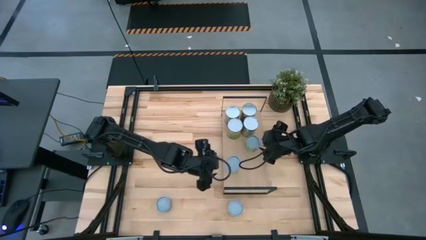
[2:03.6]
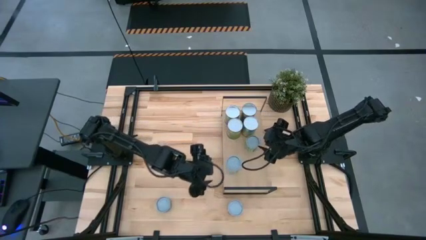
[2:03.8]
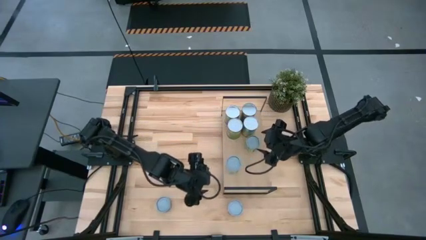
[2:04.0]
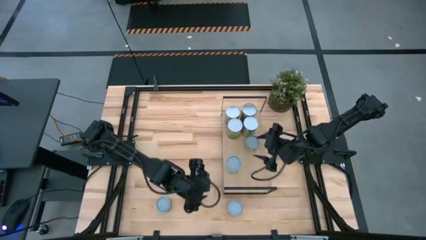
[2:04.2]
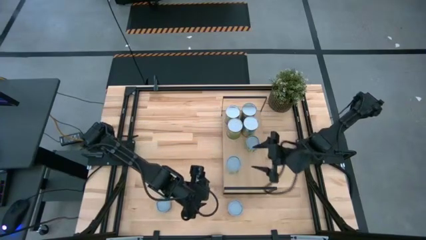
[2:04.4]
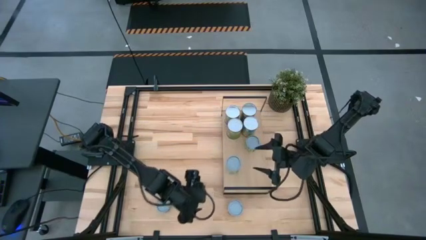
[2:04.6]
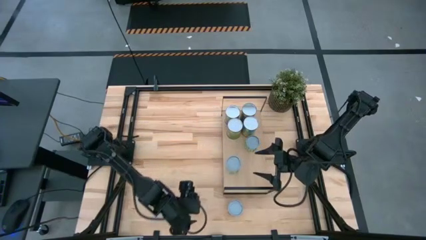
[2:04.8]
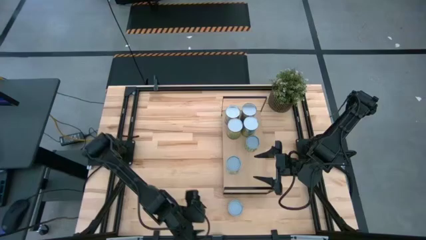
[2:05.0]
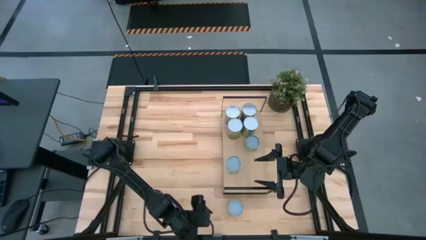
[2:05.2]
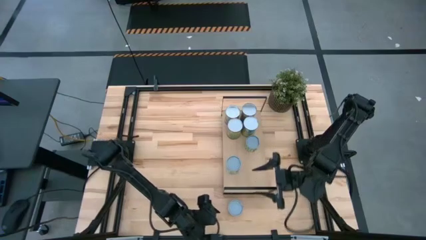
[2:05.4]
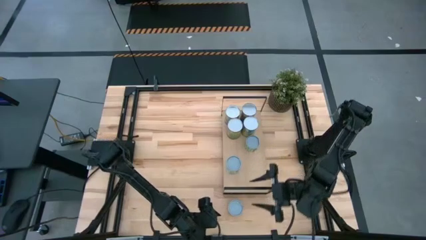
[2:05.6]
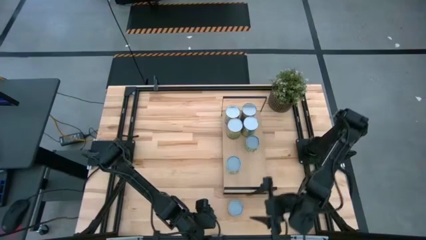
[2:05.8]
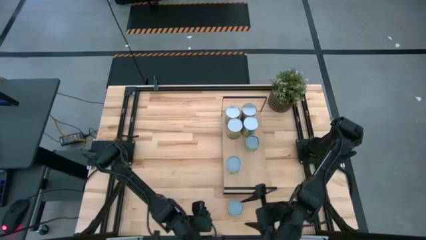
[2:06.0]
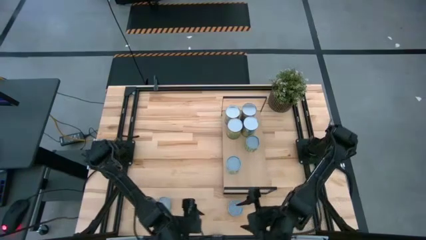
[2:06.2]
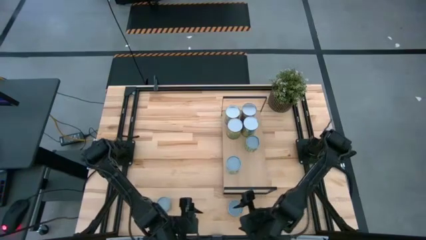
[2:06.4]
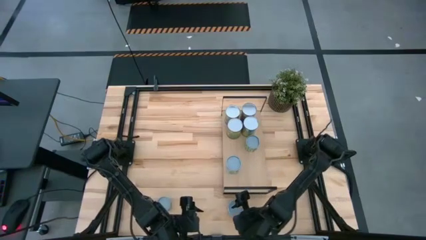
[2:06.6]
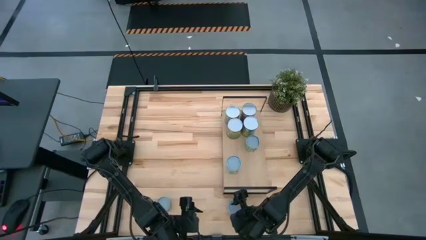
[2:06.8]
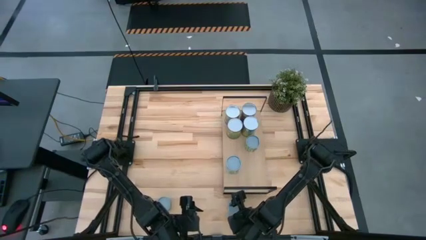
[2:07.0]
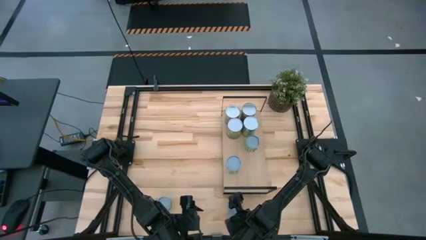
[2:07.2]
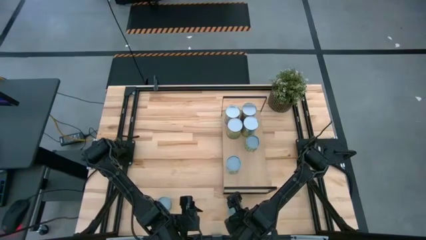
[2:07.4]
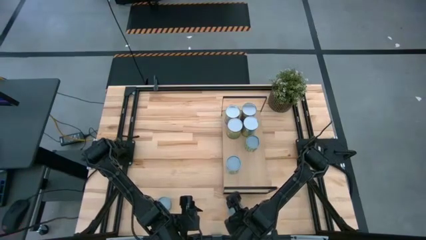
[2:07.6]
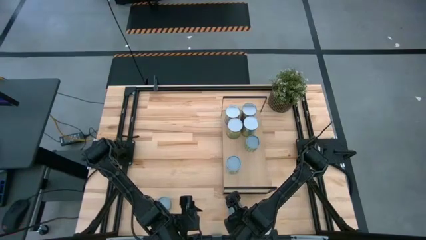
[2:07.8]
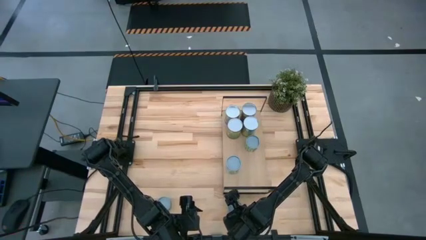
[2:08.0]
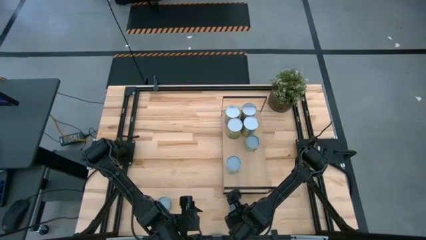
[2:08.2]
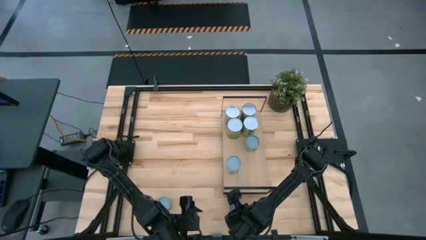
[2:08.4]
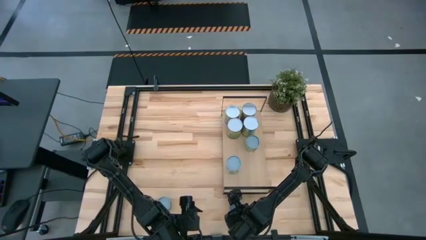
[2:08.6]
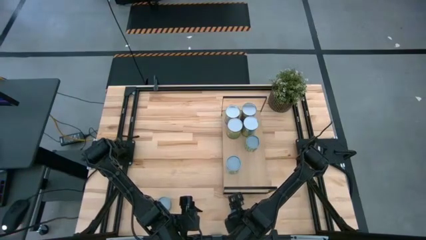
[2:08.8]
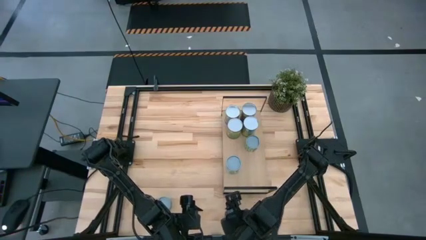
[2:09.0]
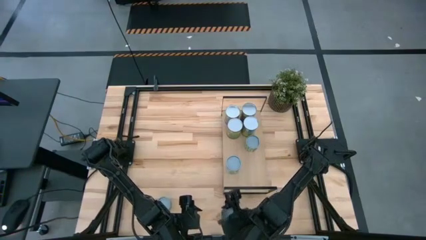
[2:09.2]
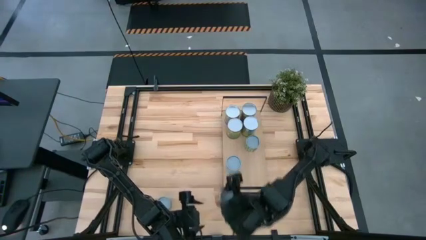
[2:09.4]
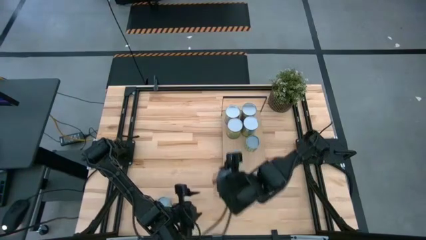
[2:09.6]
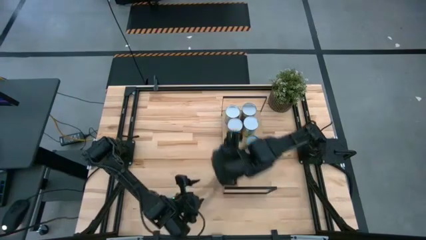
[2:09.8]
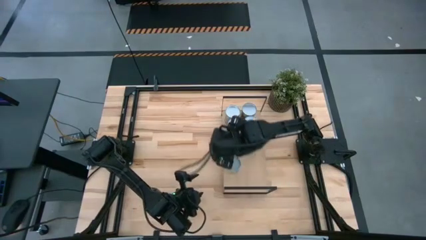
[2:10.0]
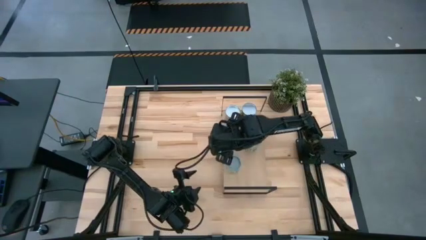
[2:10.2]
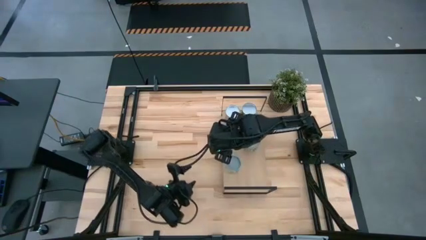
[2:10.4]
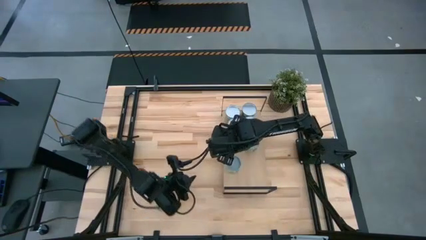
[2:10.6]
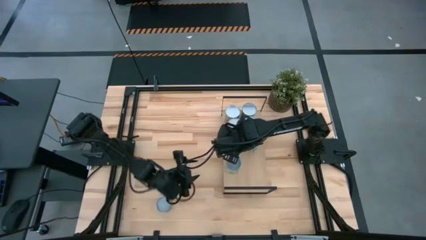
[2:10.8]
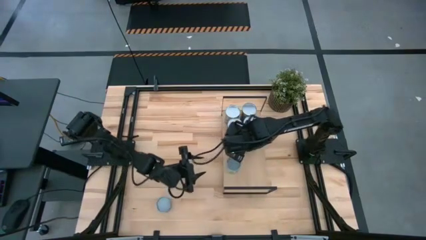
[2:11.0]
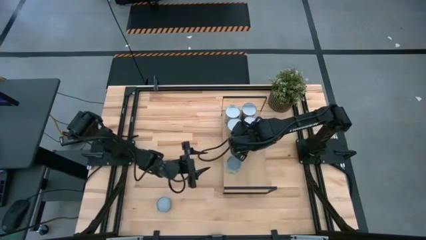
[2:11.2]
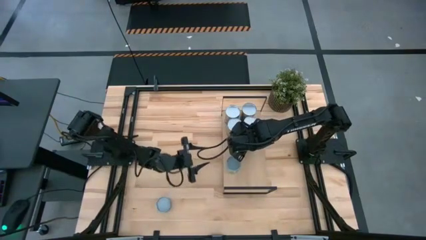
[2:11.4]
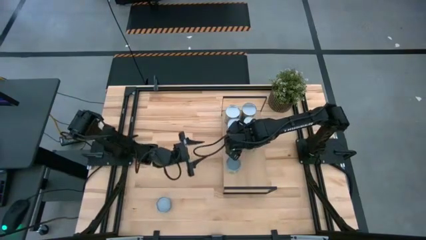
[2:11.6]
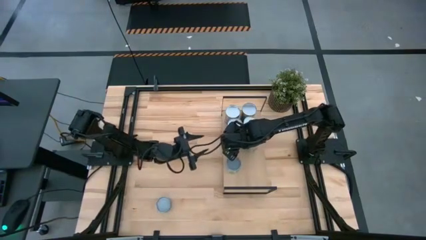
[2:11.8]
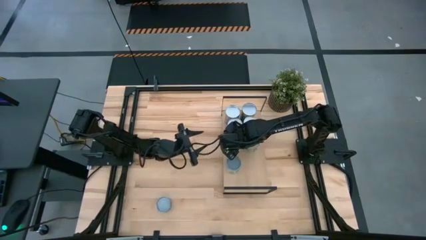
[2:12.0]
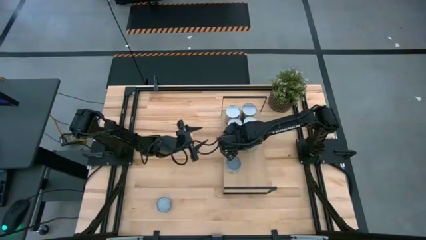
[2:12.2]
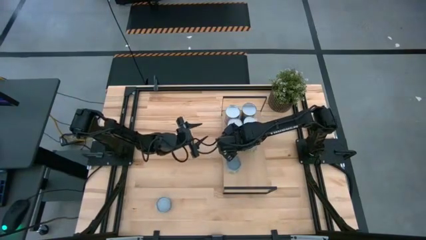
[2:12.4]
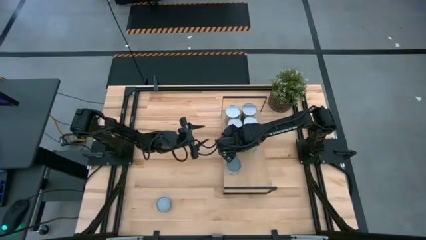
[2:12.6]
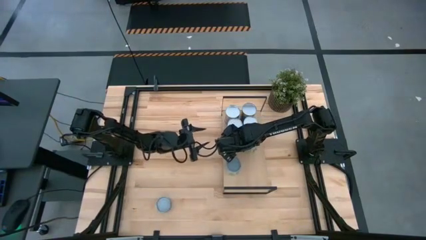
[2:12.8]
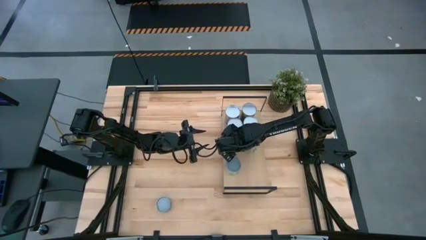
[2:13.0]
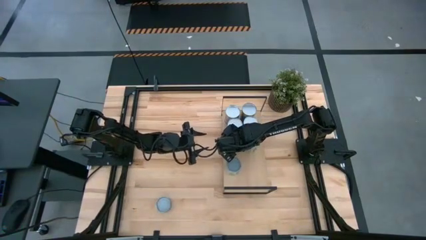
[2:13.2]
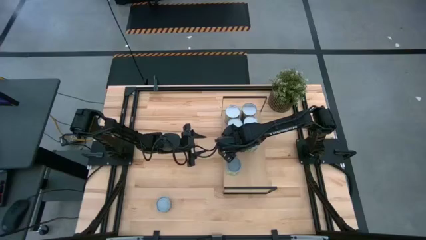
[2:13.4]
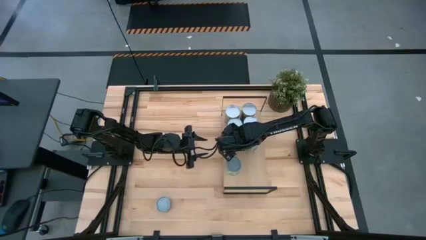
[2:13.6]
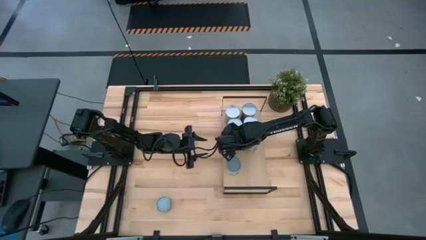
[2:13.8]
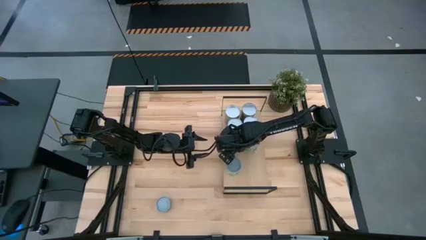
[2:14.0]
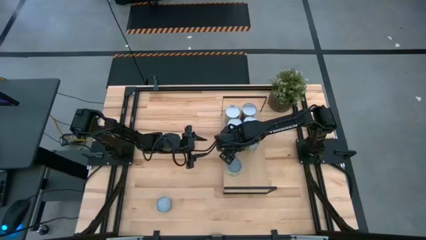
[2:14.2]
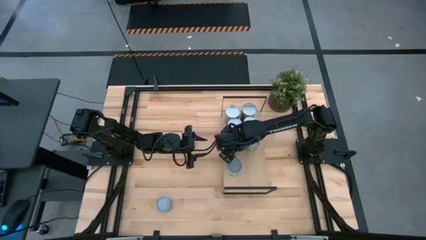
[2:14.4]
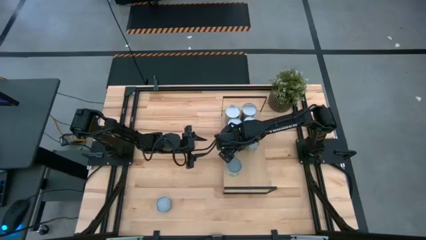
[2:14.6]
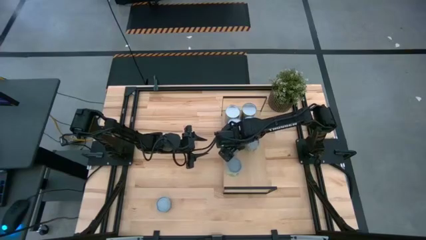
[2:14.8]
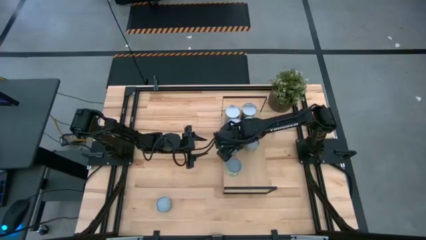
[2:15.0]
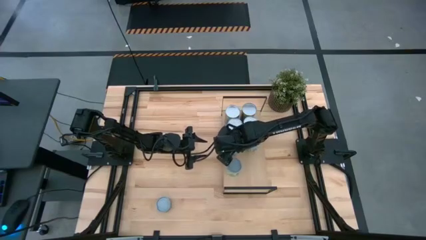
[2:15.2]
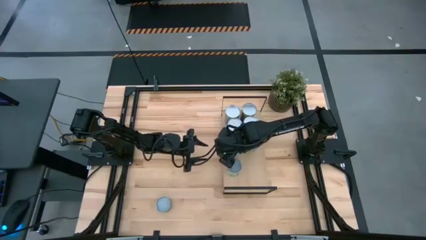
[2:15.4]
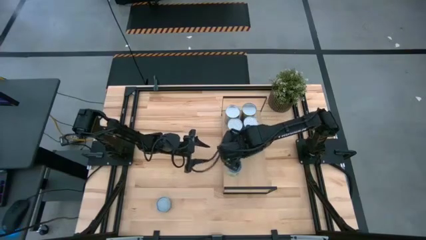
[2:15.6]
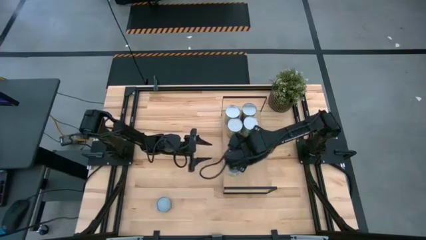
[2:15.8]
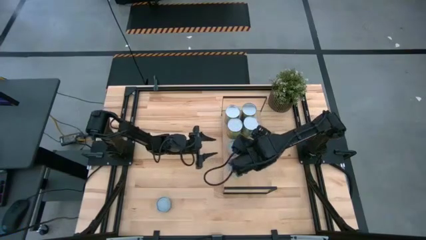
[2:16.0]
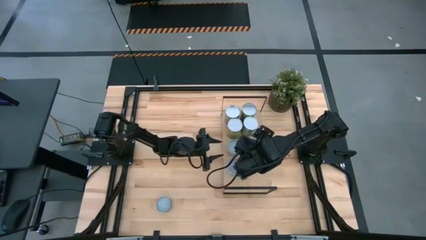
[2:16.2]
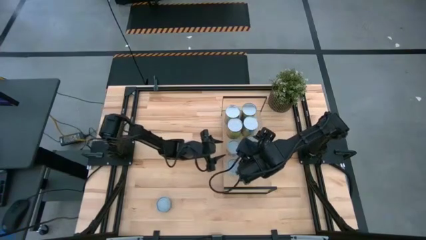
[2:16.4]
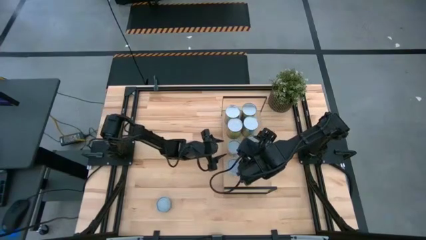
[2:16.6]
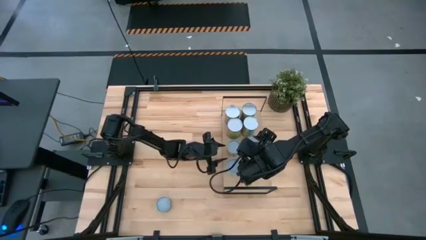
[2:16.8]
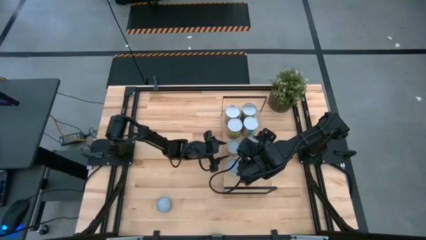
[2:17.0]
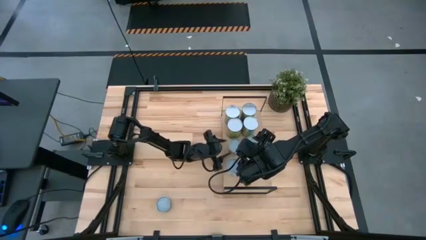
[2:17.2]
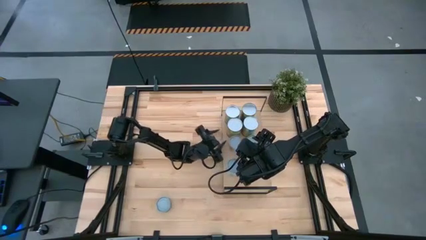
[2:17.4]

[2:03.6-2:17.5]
Task: Pick and place cans onto a shelf
Put the canned diced tomatoes on the shelf
